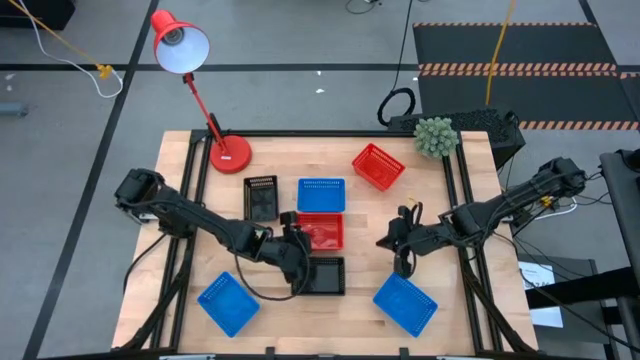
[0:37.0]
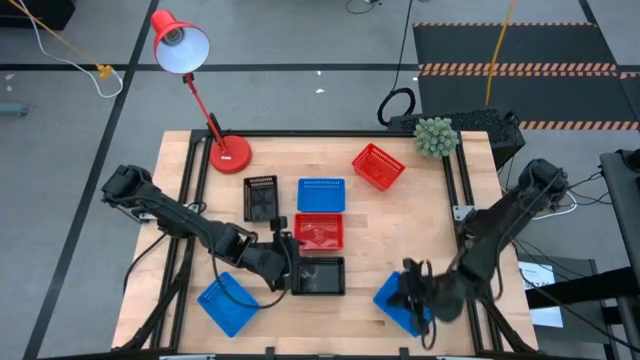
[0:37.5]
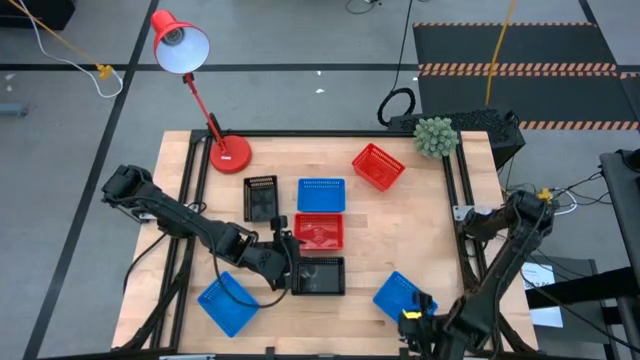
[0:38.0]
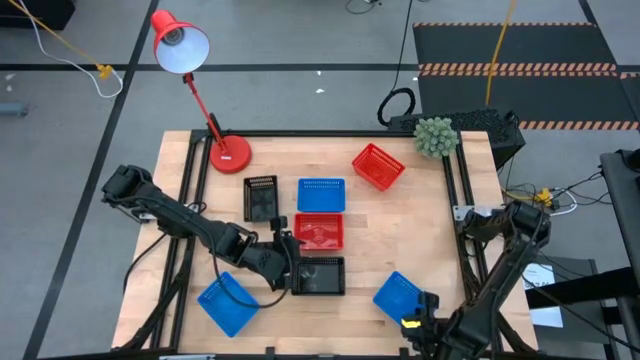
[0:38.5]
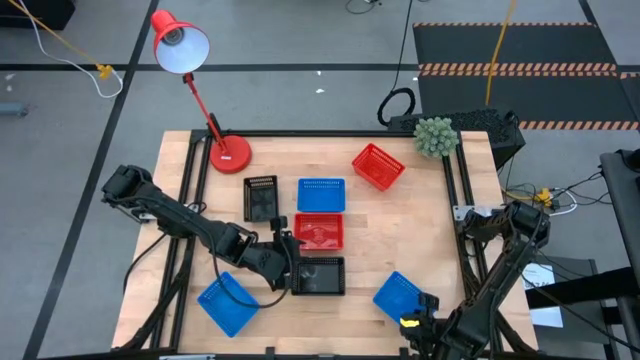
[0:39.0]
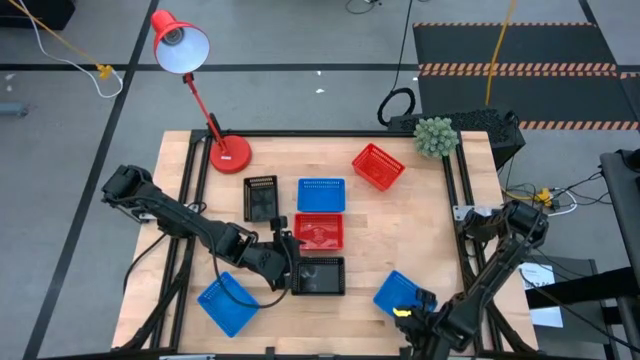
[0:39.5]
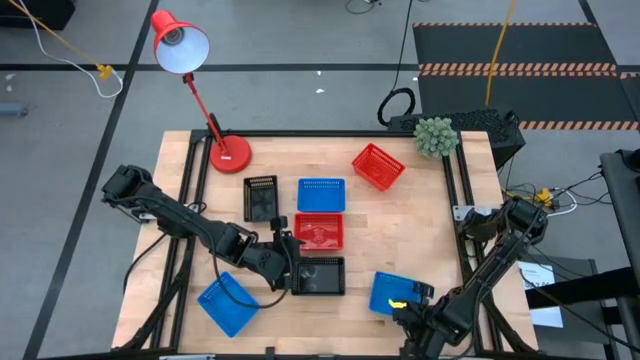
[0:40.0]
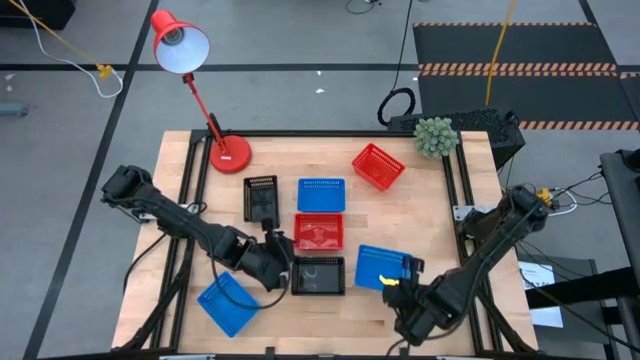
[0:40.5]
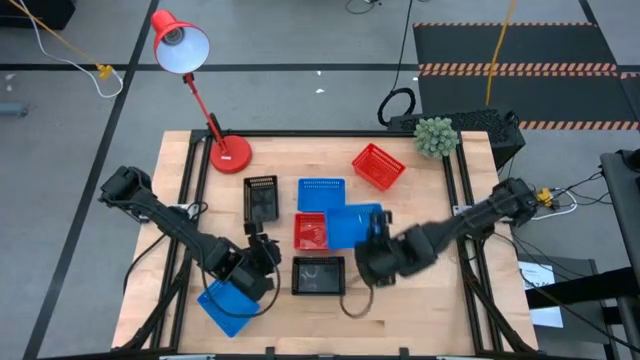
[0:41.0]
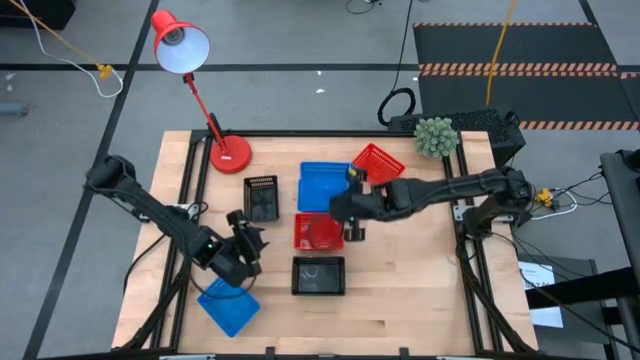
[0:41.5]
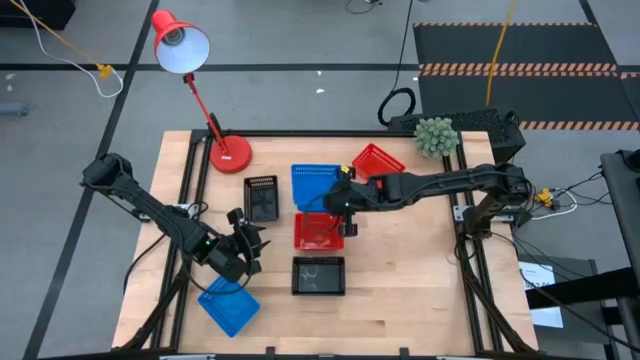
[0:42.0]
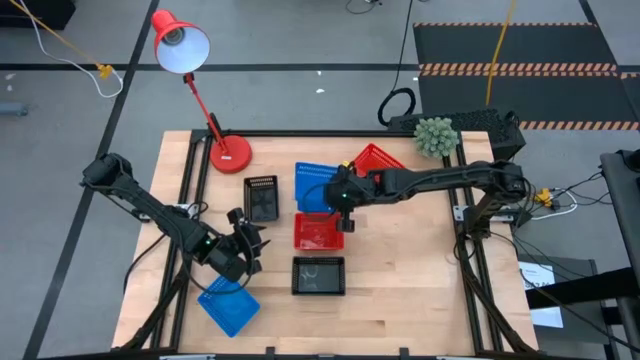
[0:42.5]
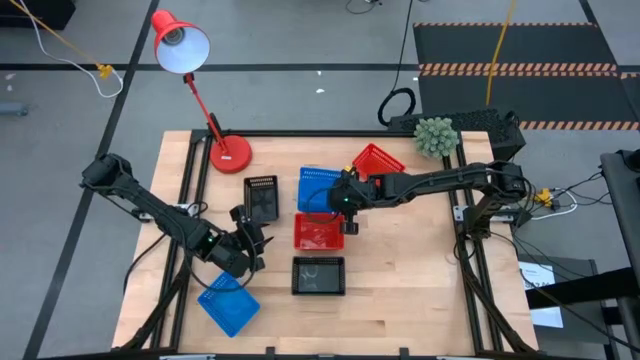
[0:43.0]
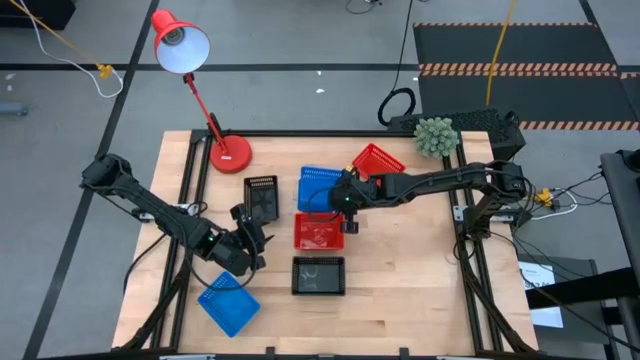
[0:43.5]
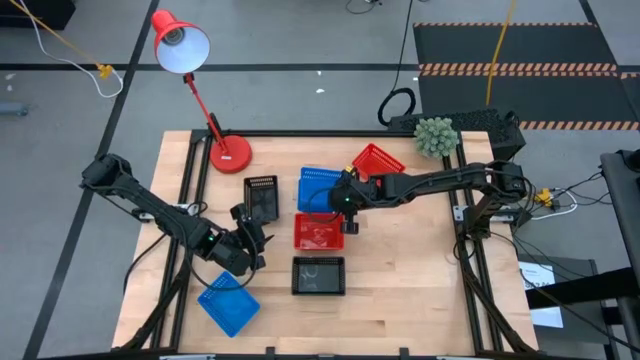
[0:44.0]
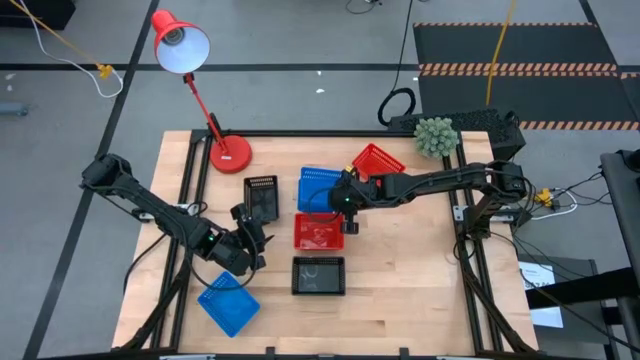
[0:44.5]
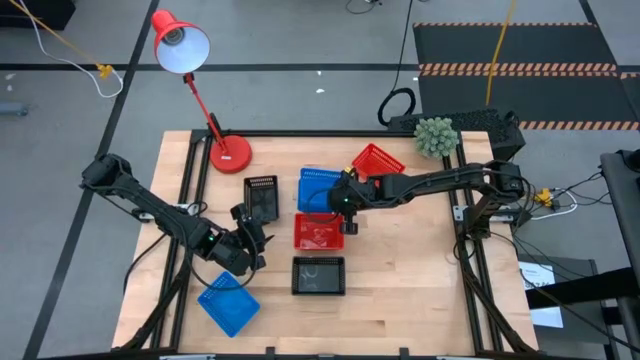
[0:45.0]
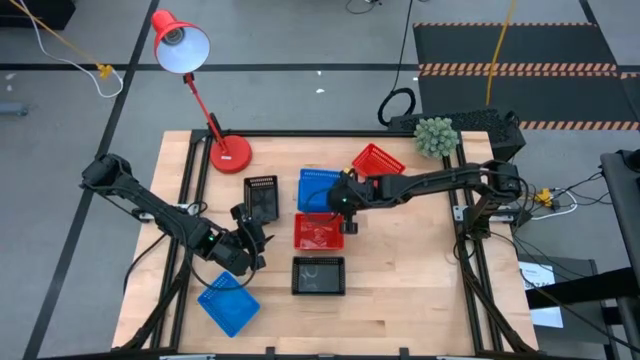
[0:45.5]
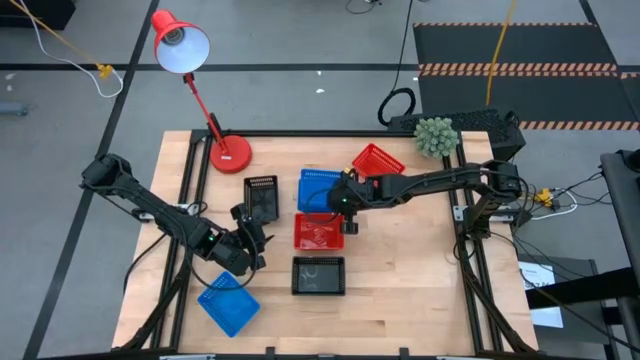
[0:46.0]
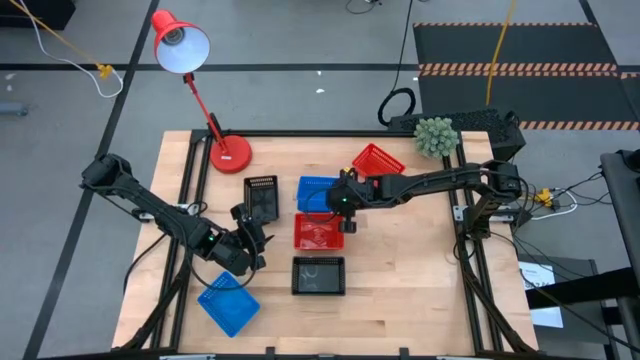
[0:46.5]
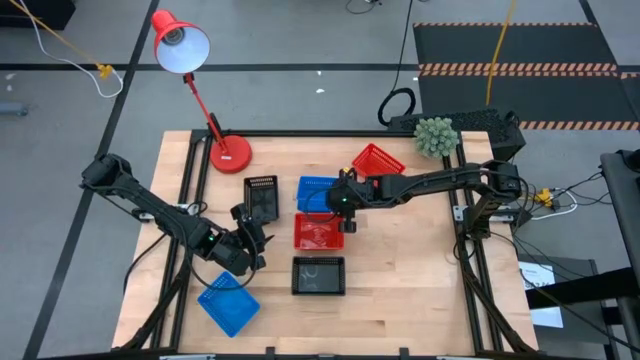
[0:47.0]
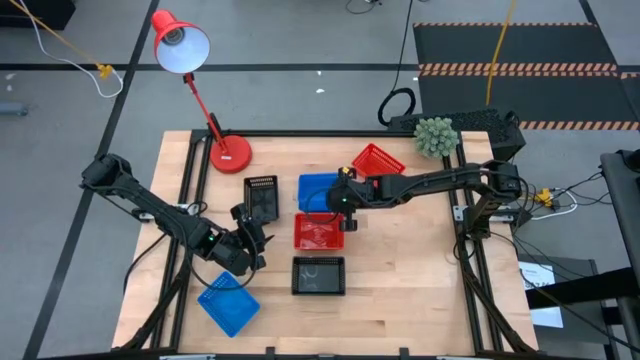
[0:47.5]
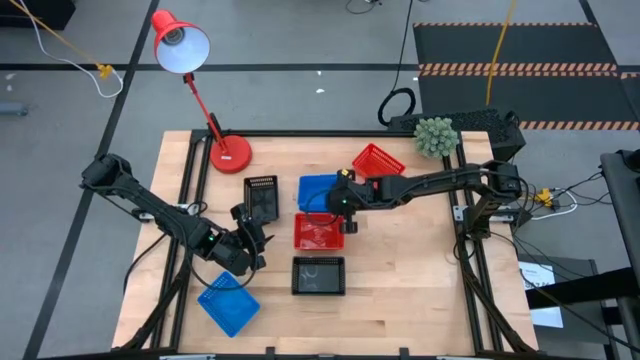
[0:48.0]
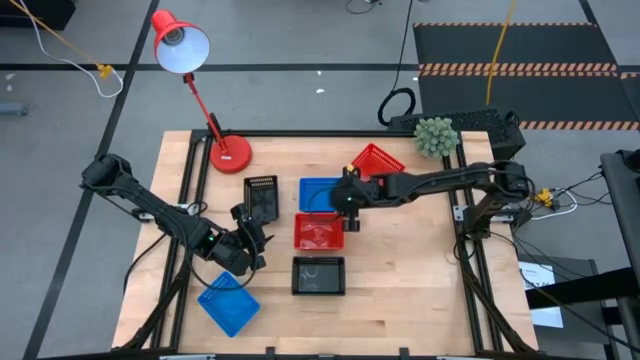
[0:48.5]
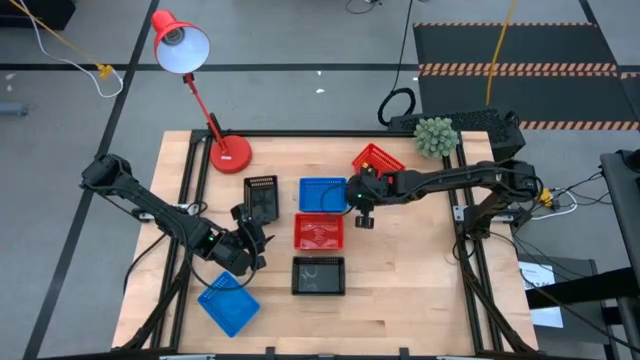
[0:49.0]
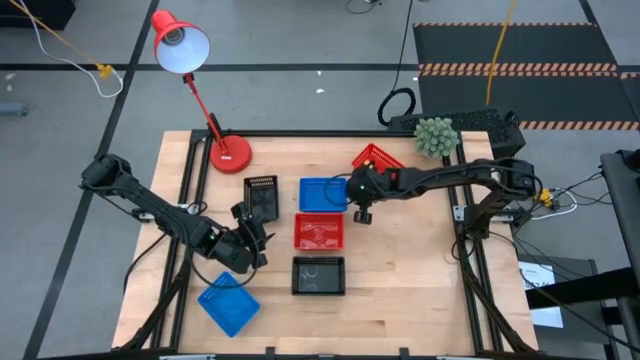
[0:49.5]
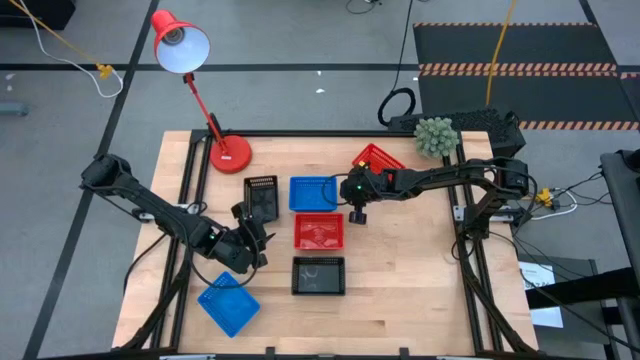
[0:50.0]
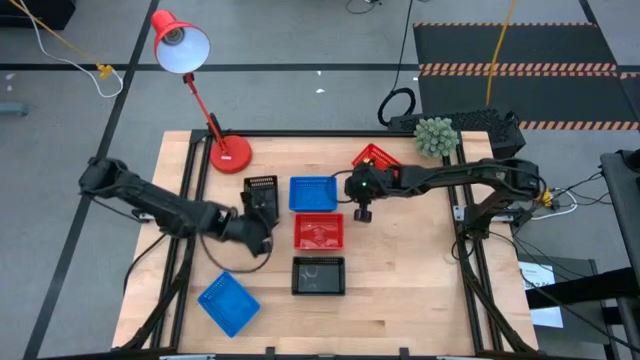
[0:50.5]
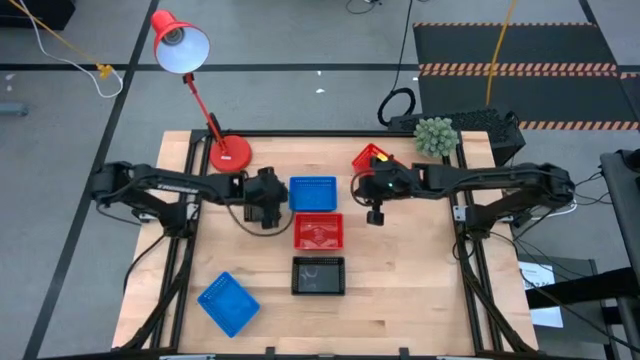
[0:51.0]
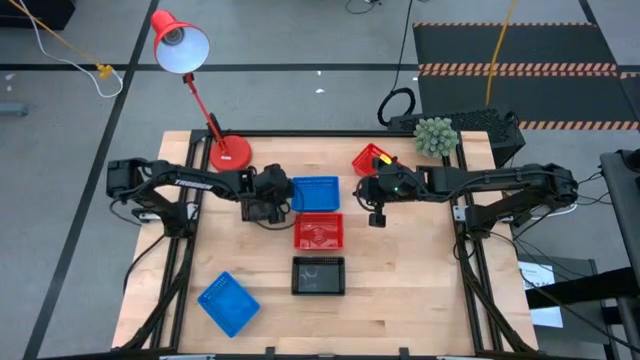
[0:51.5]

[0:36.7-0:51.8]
Stack the bottom right blue bin on the top blue bin

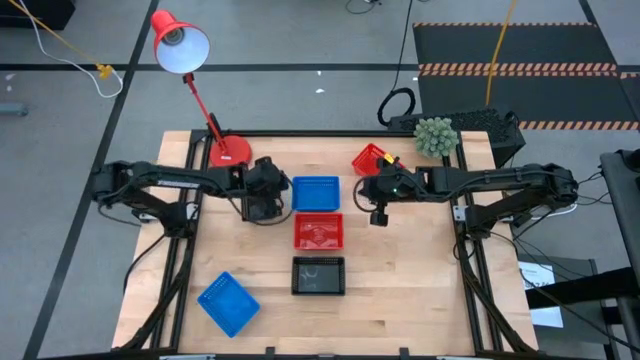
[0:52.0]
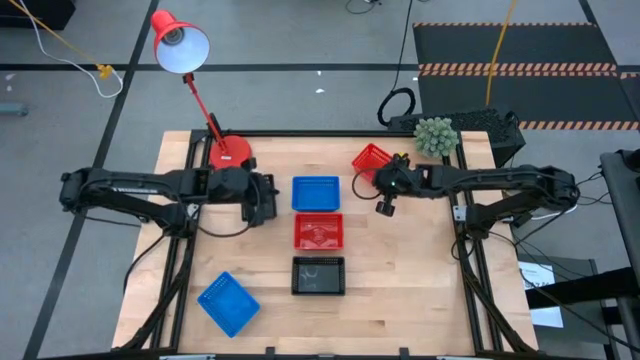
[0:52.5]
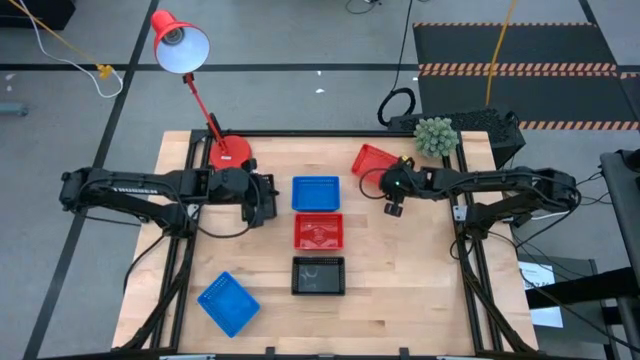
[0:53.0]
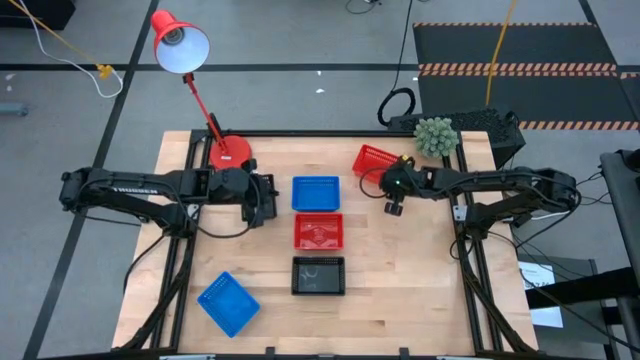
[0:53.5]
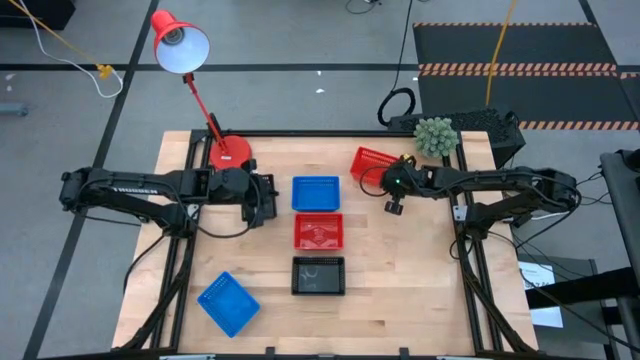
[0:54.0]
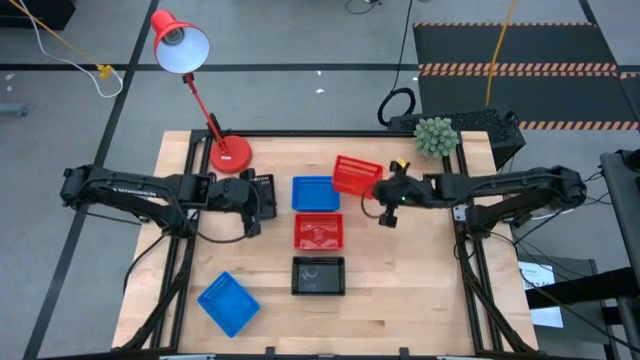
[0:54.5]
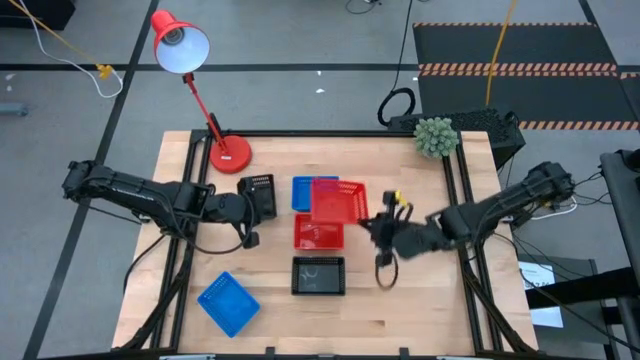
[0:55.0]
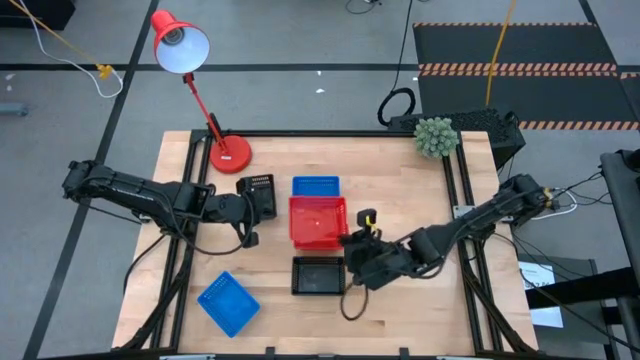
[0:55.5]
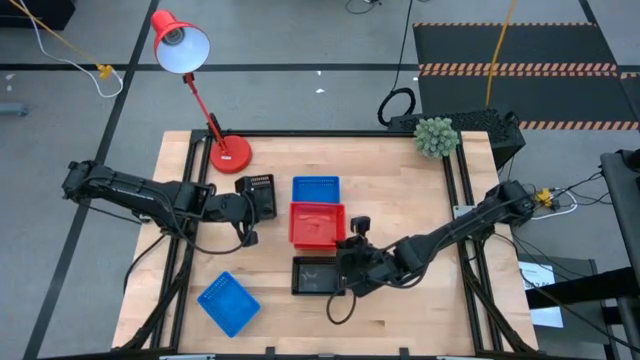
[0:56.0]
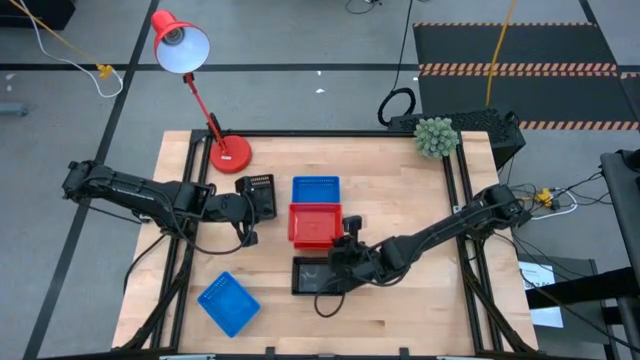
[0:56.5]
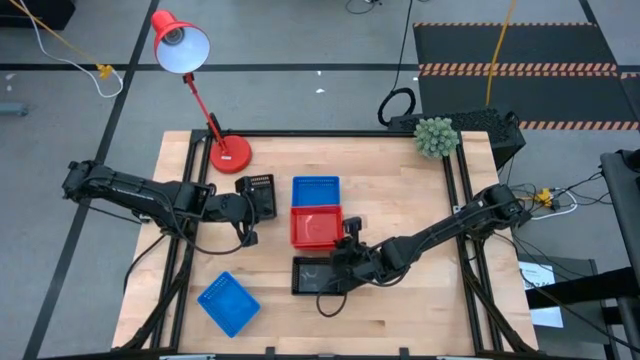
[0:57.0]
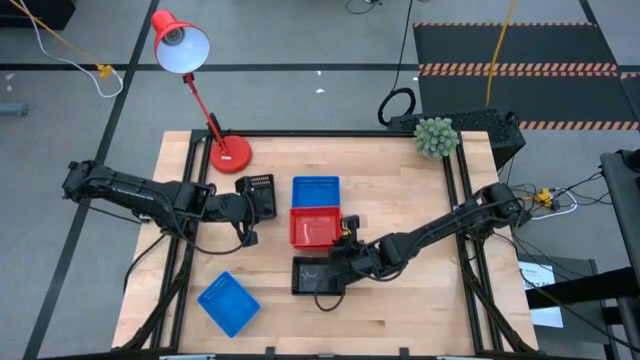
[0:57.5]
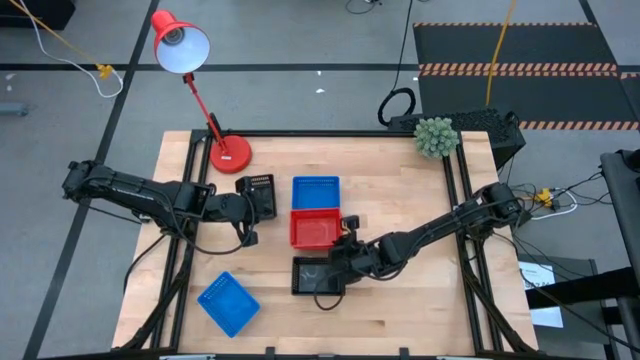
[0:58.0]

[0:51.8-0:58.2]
Stack the top red bin on the bottom stacked red bins
